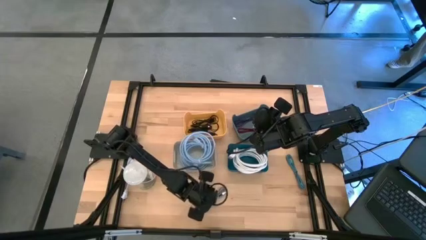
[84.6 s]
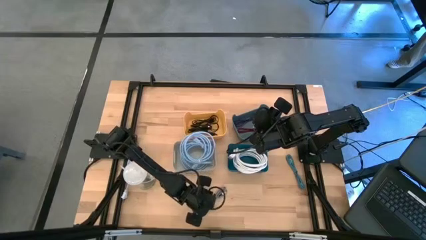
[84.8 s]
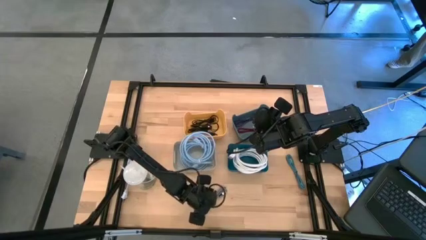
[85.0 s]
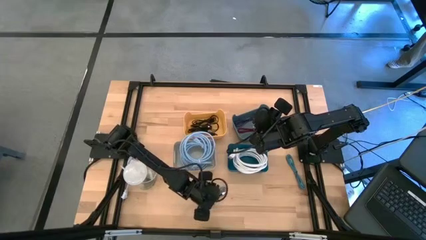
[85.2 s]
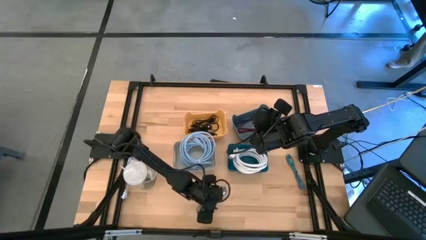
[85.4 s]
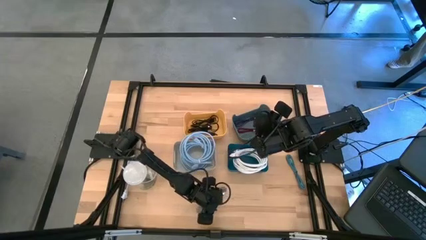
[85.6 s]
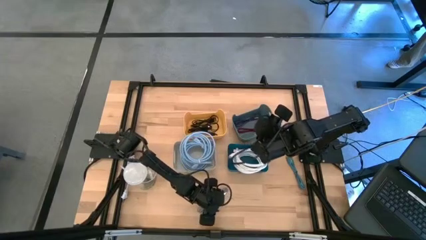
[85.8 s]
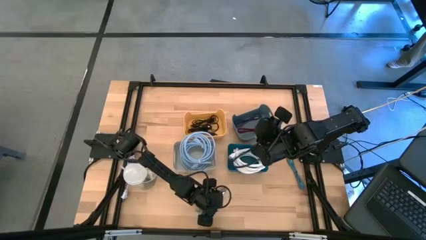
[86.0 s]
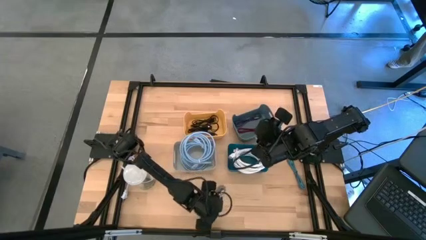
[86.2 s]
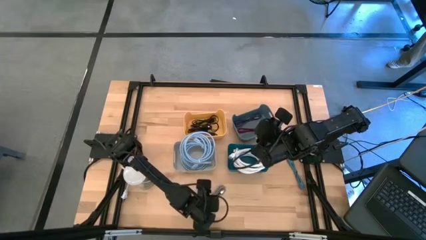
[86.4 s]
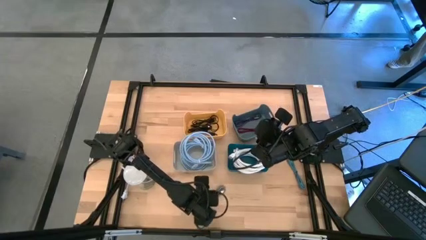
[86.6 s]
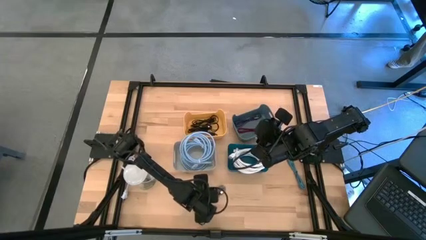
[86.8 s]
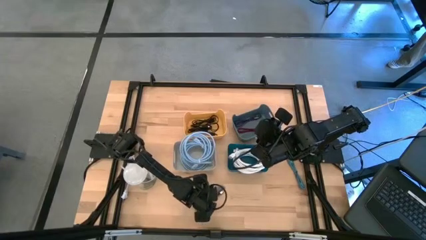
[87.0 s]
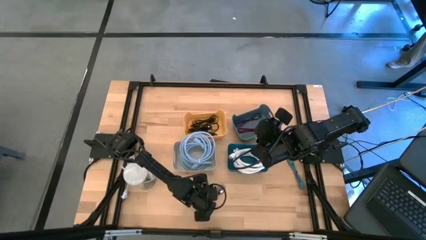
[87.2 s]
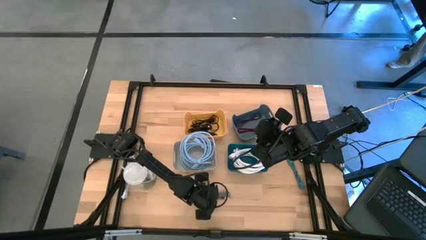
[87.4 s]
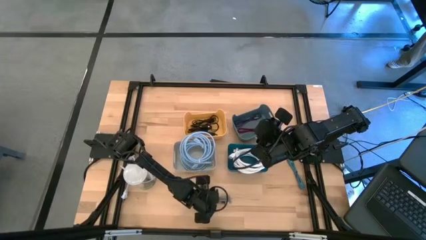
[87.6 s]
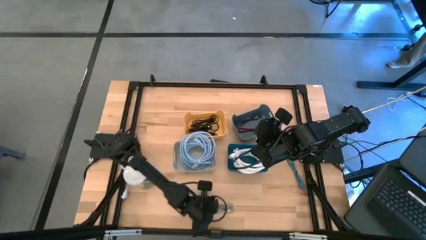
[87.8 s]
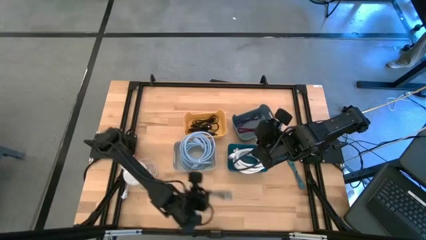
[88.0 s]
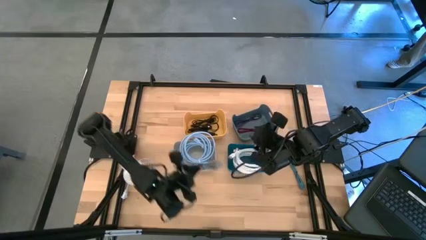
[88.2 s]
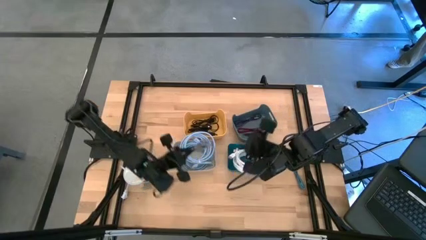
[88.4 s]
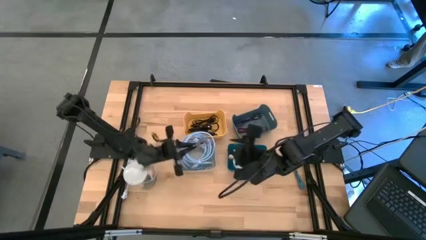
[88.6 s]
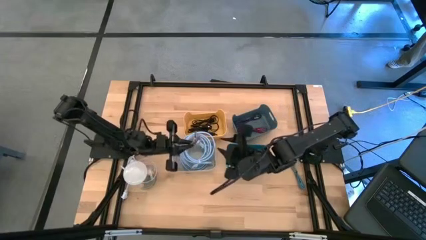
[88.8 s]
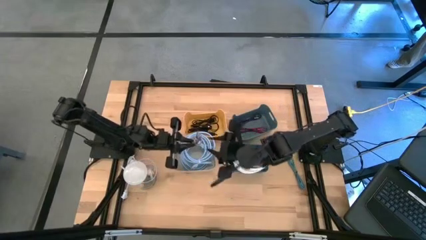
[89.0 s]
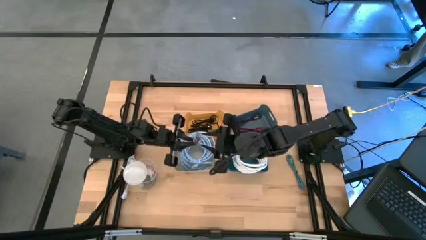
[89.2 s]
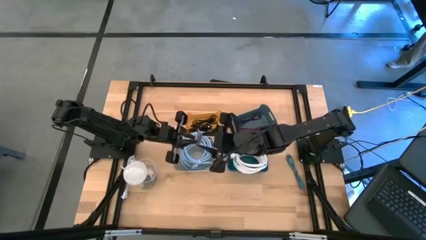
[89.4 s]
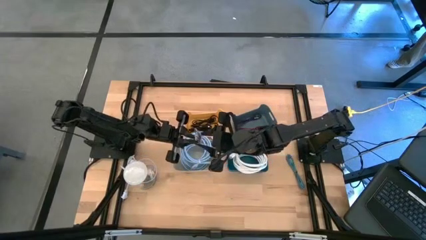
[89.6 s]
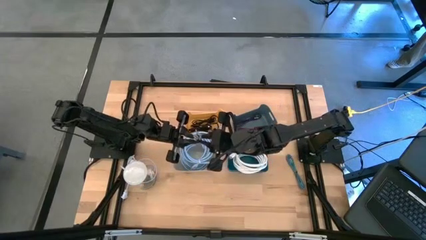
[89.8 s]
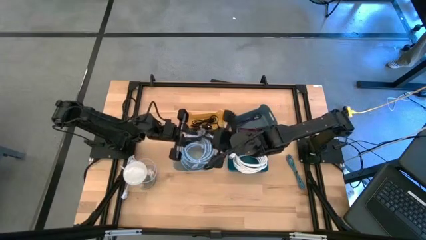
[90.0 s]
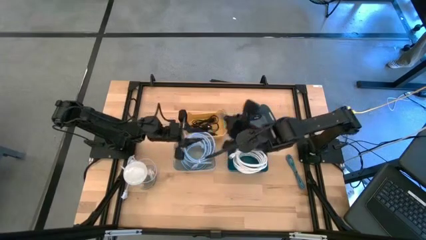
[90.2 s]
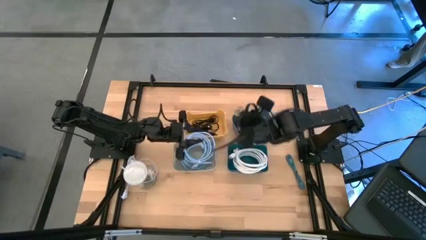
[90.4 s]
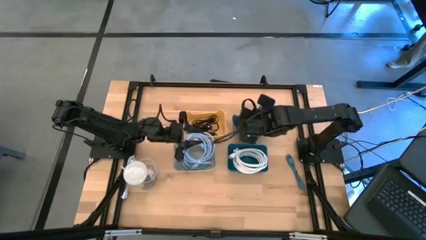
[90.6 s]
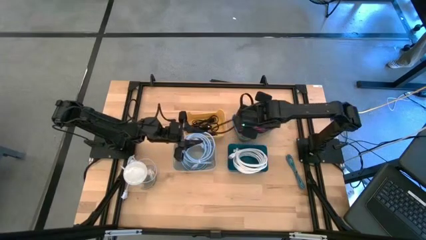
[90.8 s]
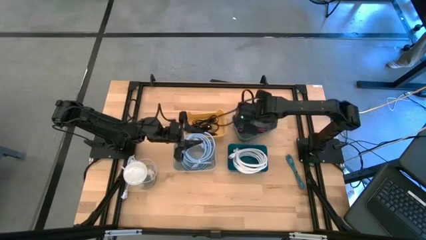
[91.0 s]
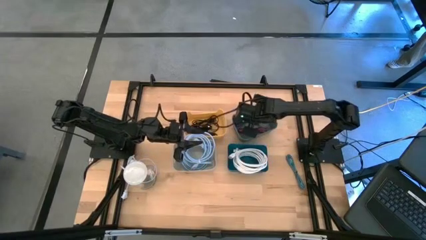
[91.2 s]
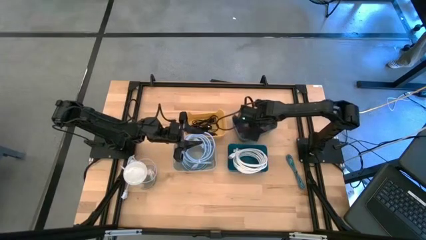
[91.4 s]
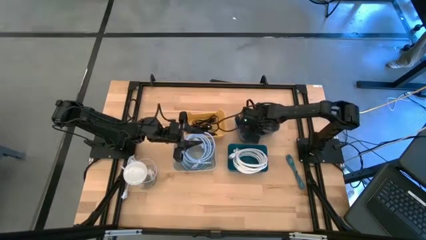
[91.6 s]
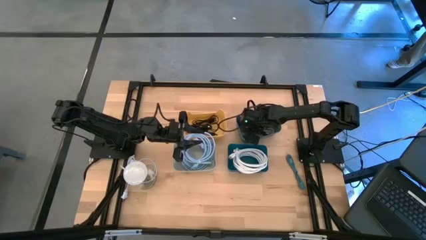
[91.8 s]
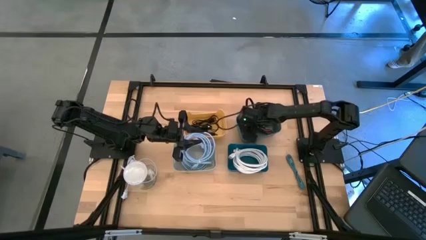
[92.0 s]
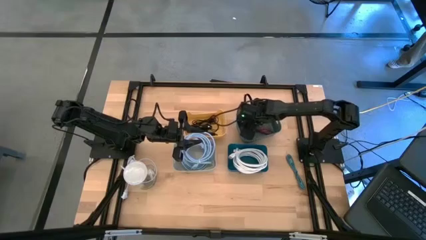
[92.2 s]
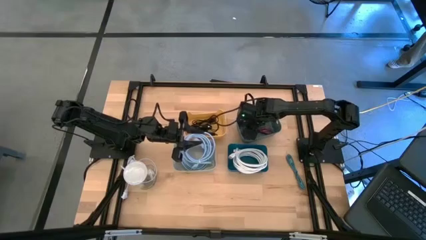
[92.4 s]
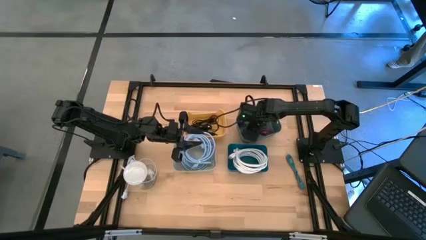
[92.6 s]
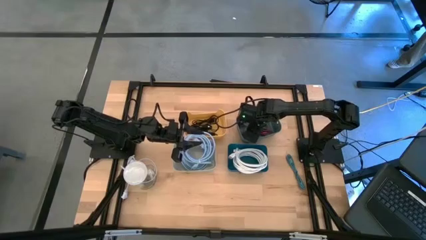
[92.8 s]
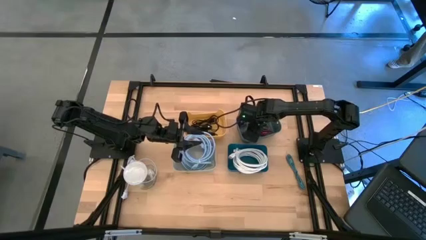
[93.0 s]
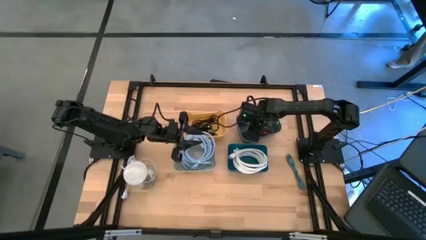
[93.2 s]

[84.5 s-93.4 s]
Task: Pick & Place USB Port
Put the patterned white USB cable into the green bin

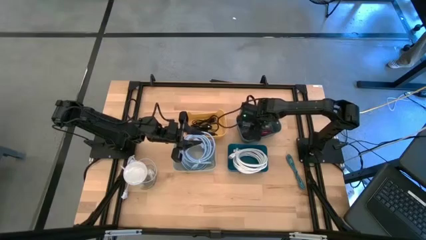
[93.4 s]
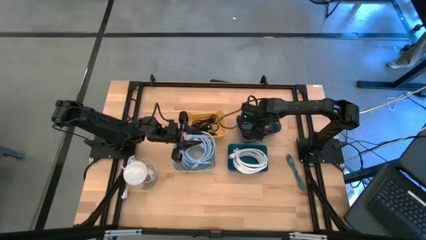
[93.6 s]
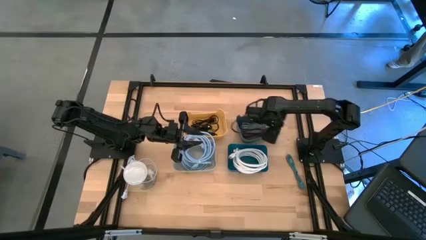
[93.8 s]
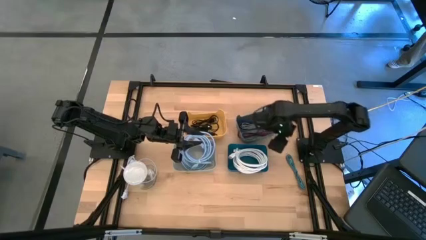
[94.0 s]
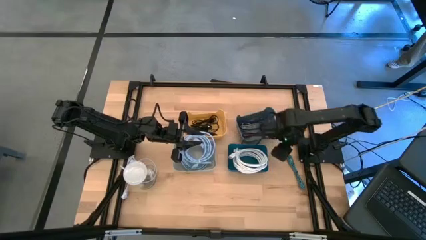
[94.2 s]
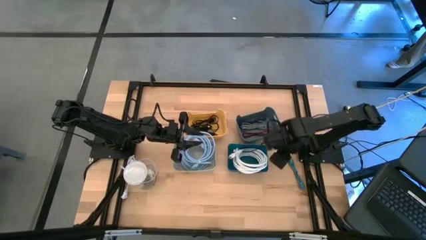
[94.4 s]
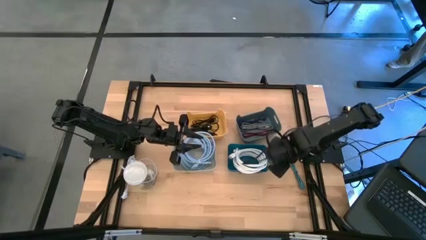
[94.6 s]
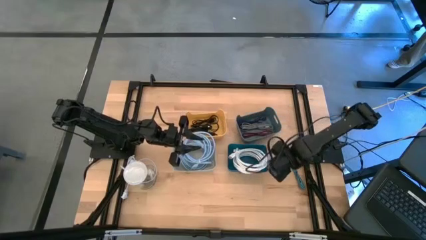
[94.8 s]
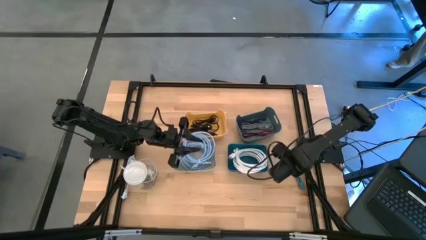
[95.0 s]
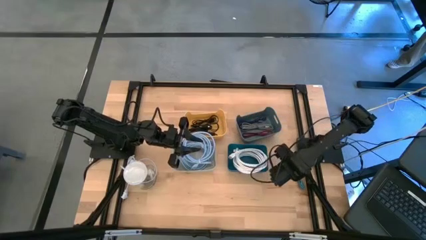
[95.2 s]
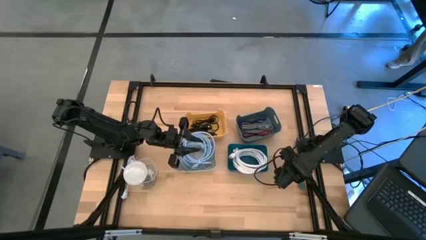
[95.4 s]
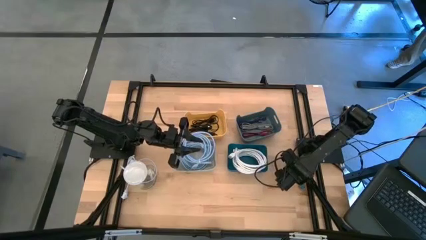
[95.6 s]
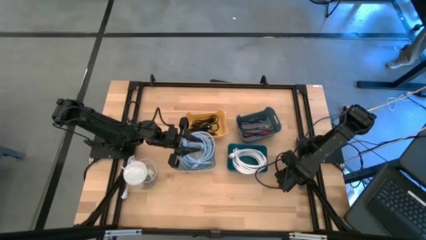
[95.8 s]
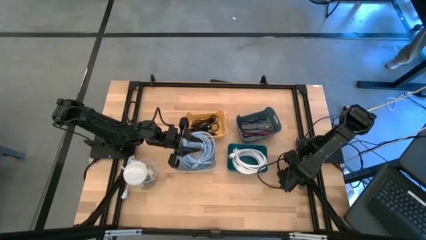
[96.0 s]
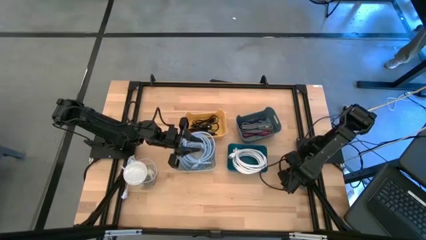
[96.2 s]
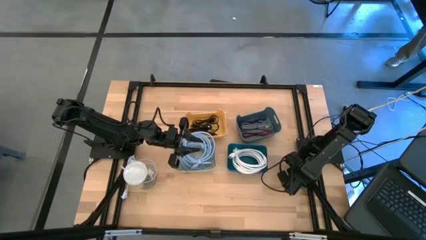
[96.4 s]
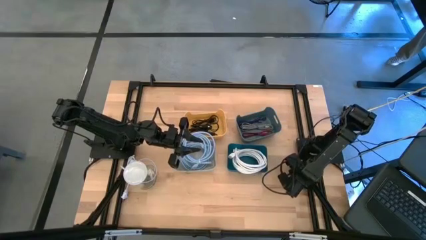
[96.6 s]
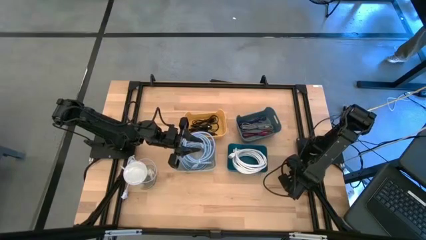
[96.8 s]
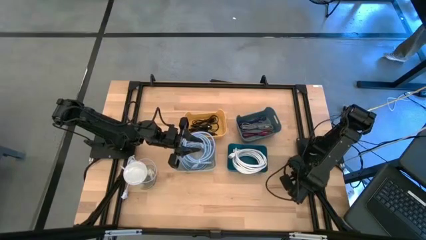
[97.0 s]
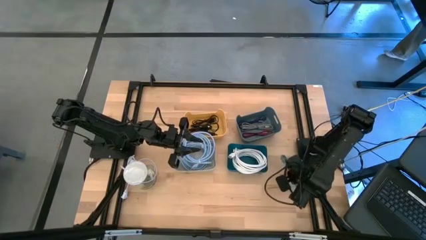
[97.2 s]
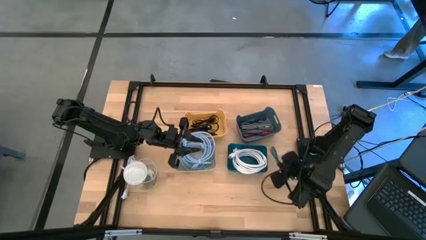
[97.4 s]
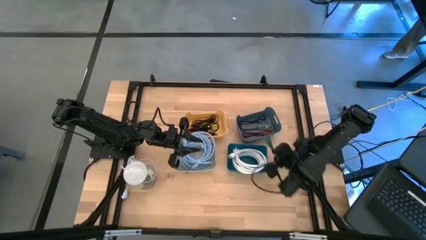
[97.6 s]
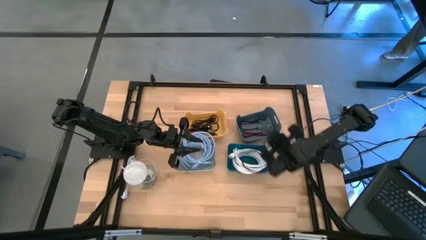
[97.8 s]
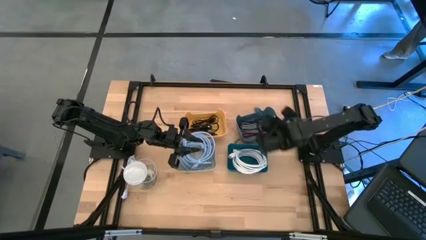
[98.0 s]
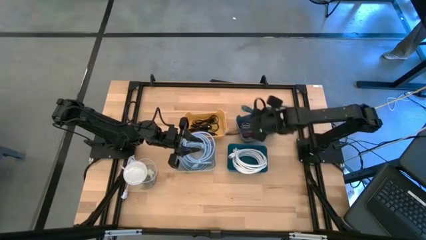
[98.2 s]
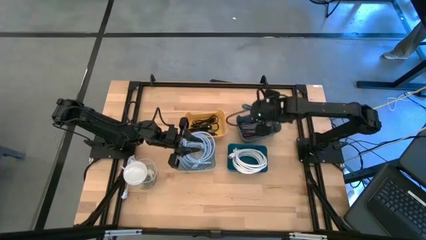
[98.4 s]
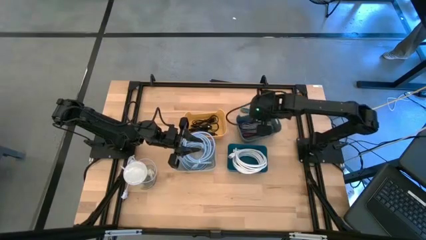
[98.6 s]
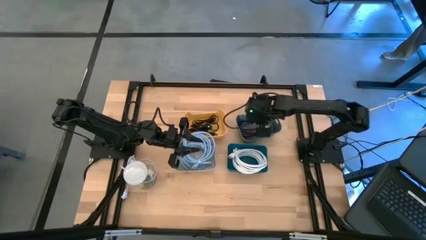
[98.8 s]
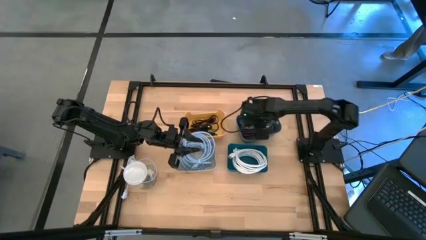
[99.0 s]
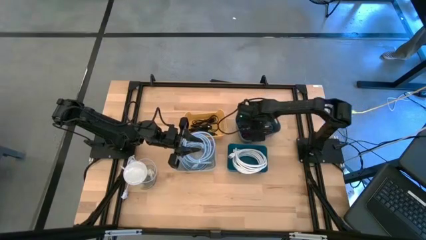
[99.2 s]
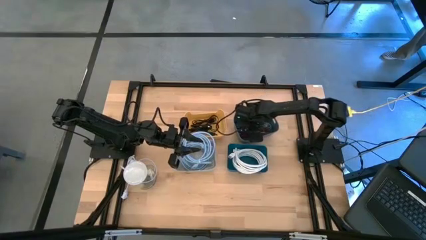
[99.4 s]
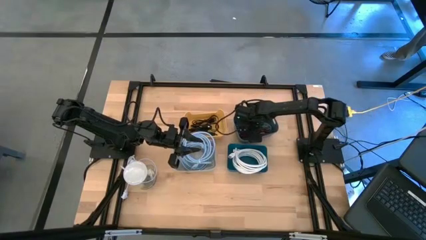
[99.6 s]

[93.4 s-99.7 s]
Put the patterned blue USB cable into the green bin

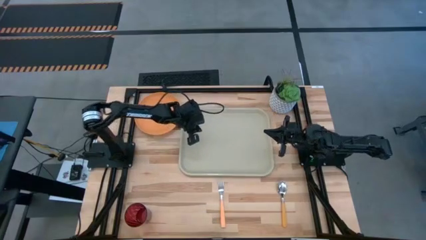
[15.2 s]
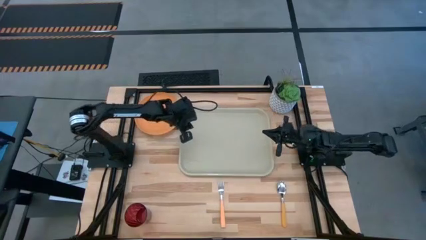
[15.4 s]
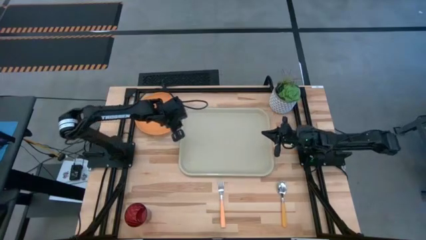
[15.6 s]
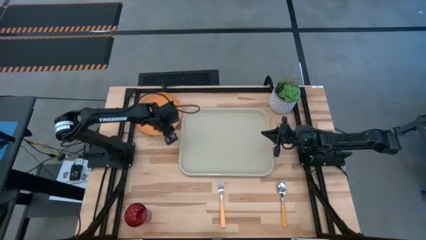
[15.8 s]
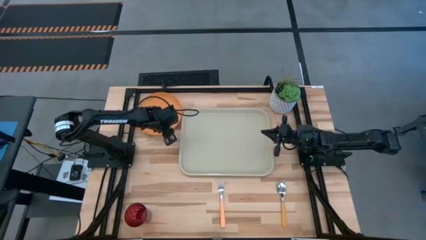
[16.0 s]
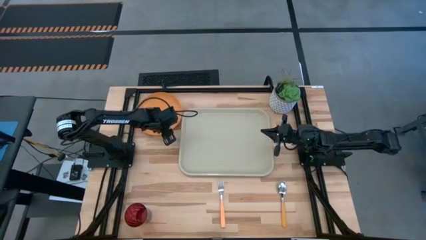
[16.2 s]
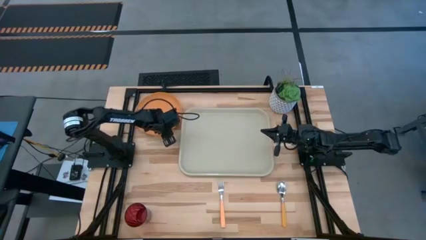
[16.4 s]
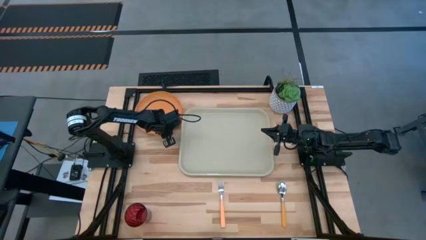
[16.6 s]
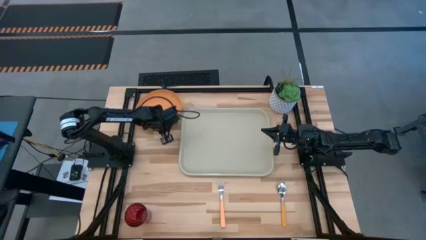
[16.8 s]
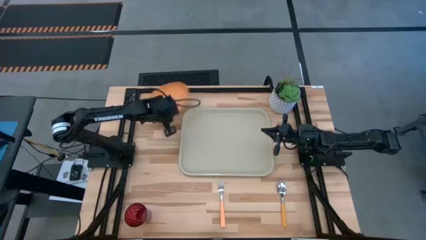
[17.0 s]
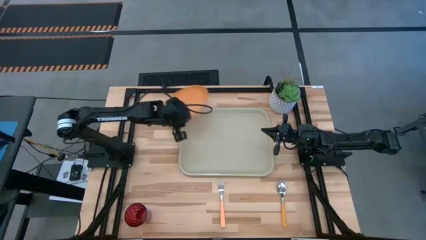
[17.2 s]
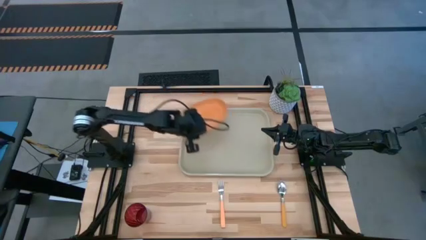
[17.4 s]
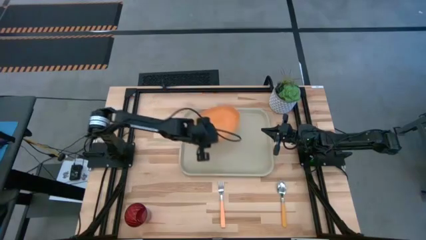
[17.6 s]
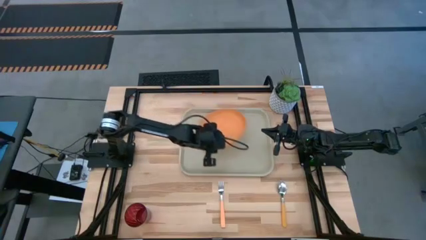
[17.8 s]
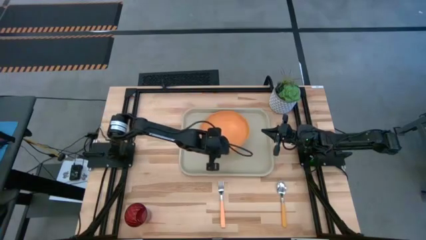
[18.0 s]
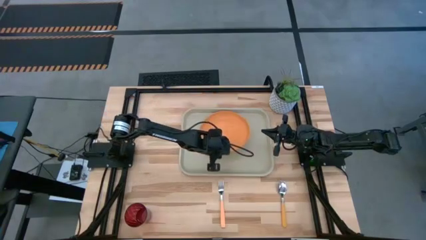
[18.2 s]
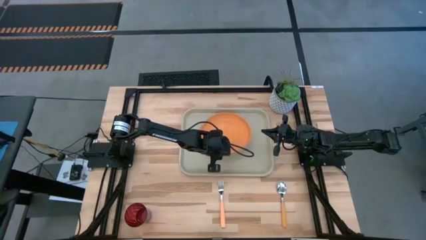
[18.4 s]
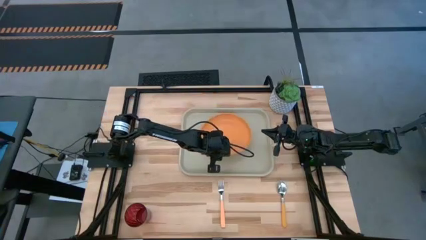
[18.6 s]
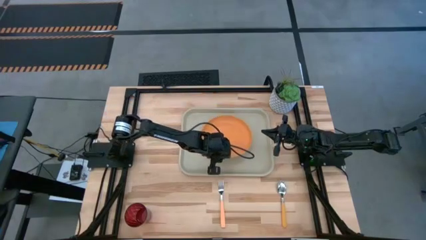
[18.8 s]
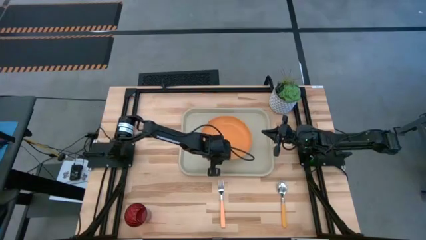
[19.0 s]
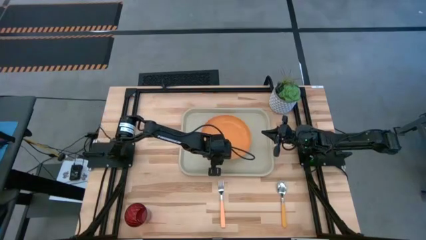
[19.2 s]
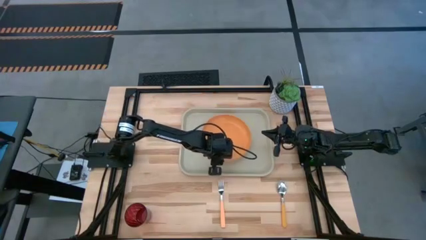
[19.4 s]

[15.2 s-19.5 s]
Task: Pick and place plate/cup/fork/spoon on tray
Put the orange plate on the gray serving tray
